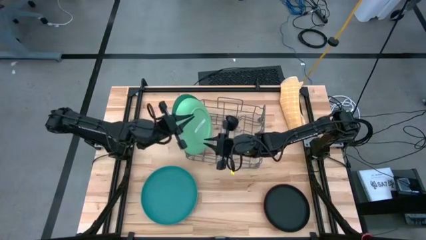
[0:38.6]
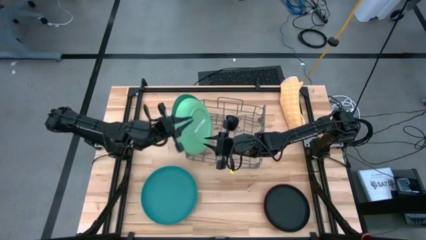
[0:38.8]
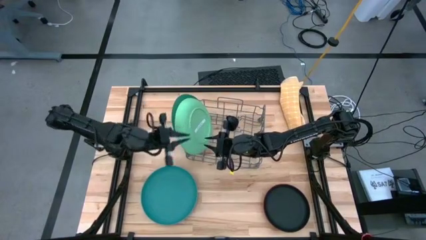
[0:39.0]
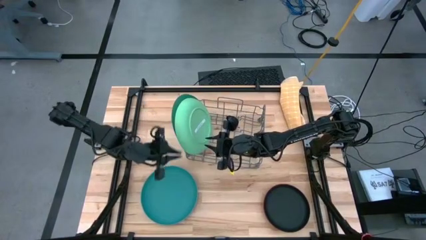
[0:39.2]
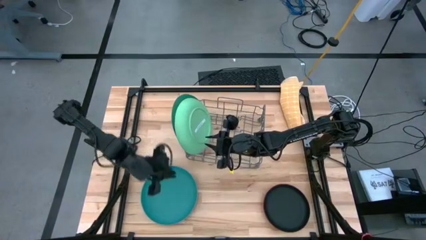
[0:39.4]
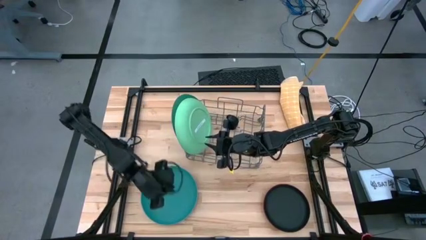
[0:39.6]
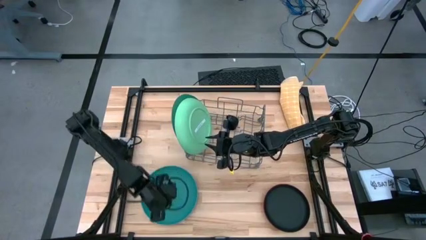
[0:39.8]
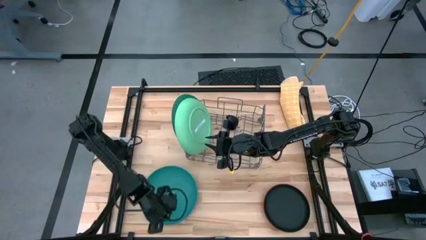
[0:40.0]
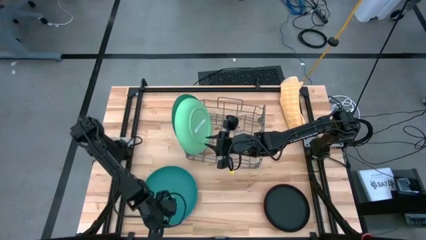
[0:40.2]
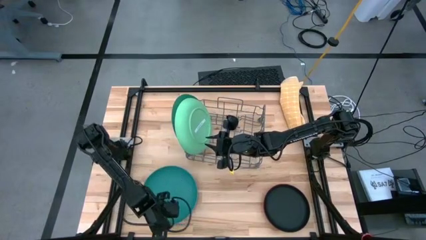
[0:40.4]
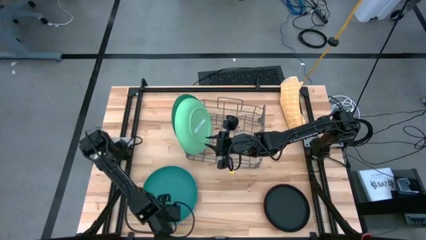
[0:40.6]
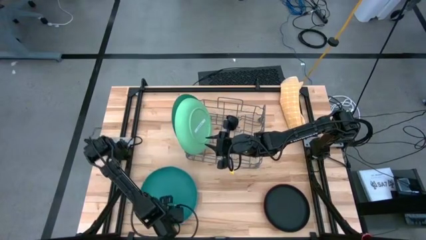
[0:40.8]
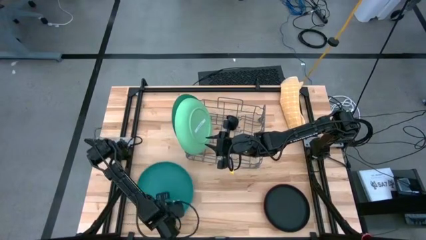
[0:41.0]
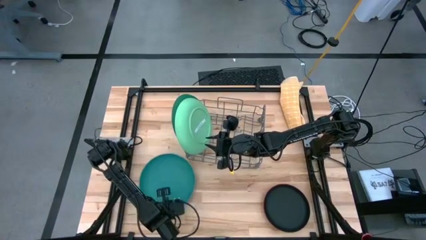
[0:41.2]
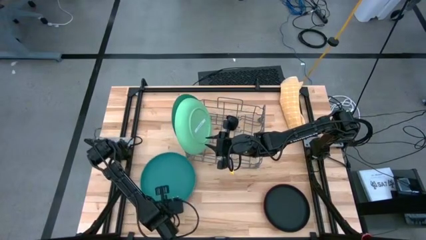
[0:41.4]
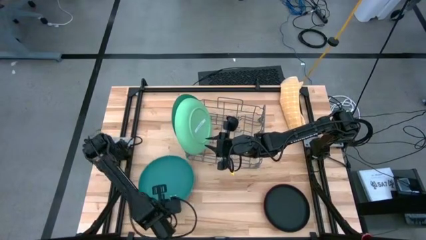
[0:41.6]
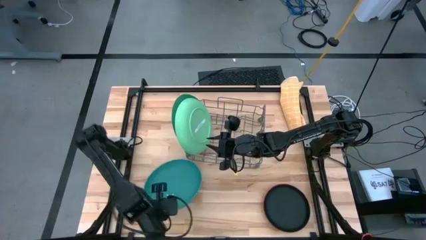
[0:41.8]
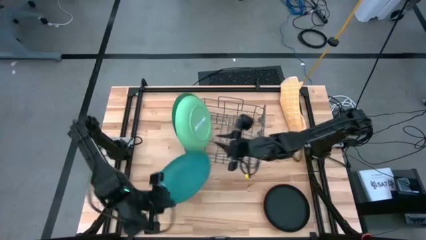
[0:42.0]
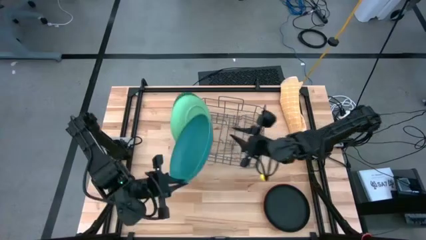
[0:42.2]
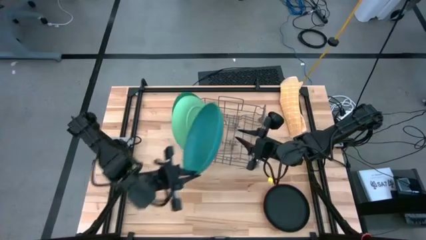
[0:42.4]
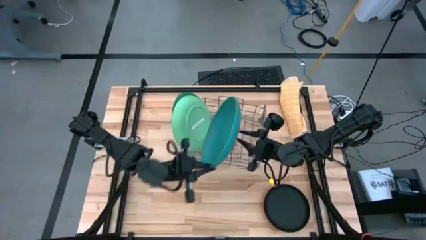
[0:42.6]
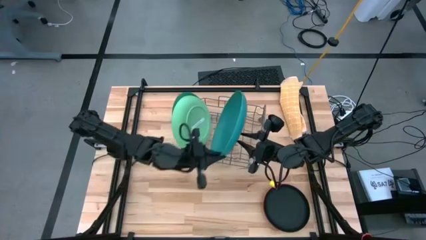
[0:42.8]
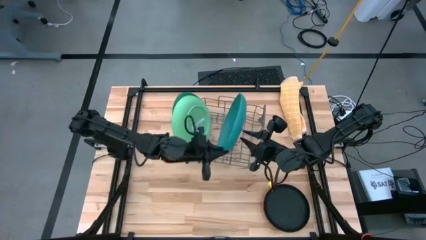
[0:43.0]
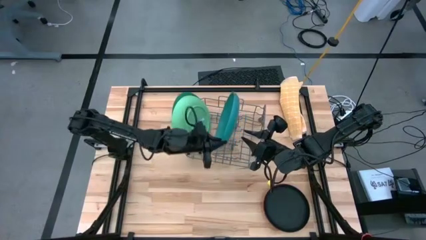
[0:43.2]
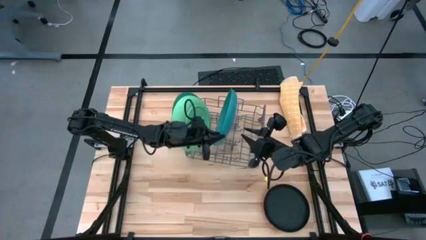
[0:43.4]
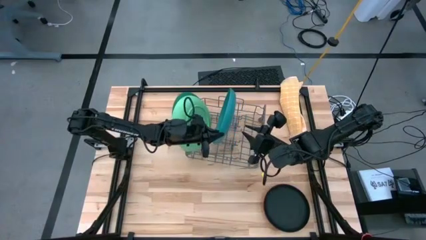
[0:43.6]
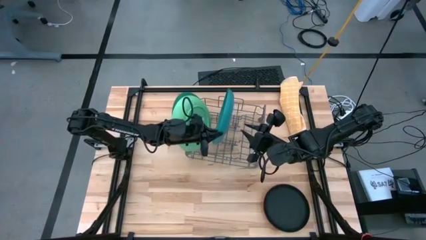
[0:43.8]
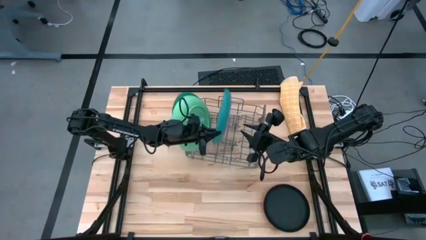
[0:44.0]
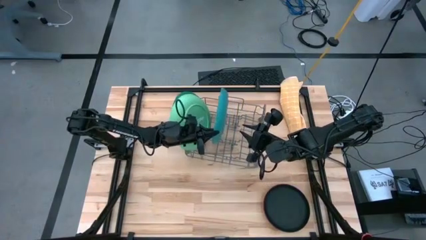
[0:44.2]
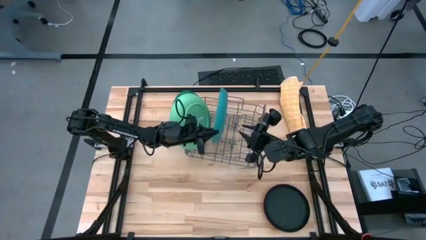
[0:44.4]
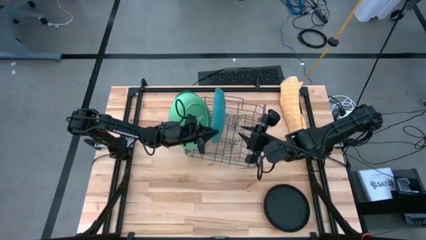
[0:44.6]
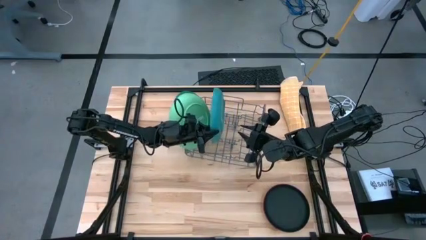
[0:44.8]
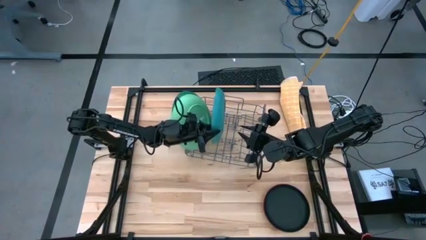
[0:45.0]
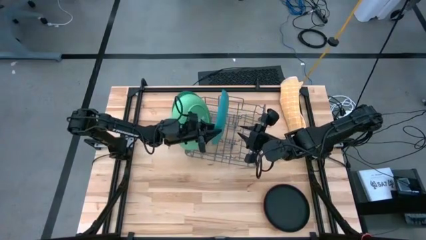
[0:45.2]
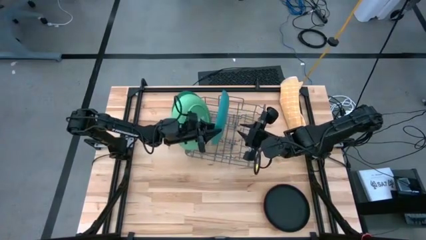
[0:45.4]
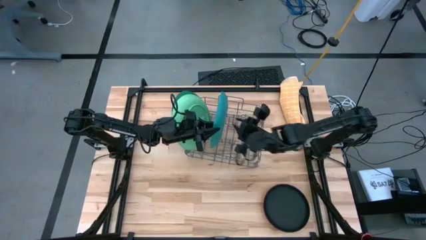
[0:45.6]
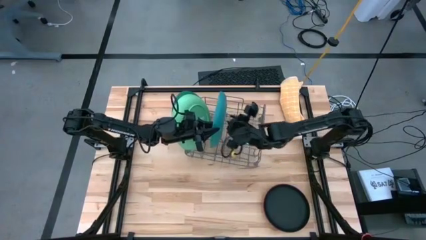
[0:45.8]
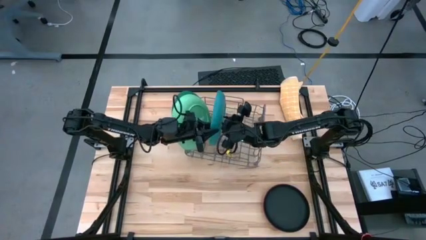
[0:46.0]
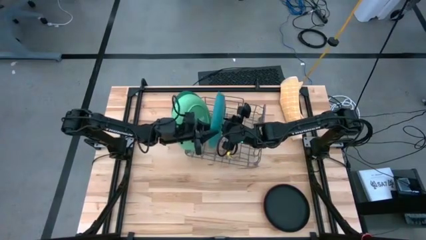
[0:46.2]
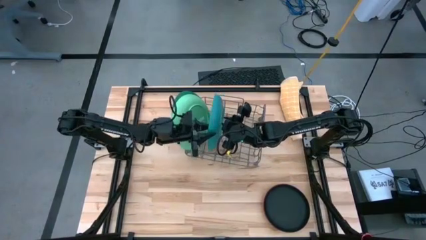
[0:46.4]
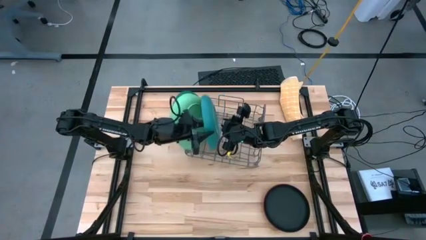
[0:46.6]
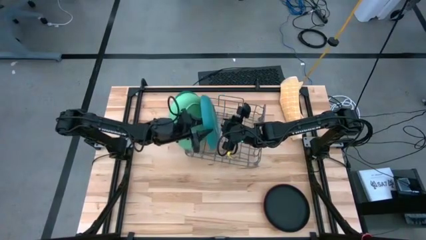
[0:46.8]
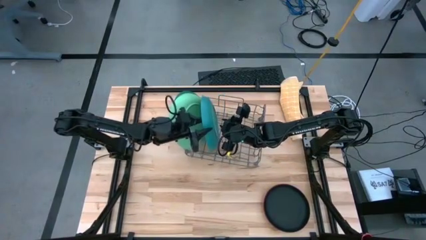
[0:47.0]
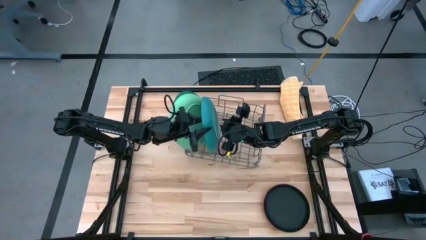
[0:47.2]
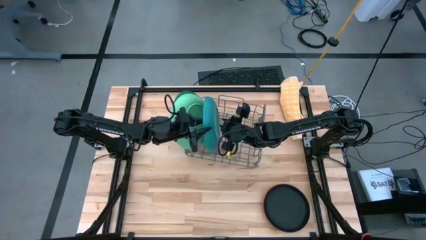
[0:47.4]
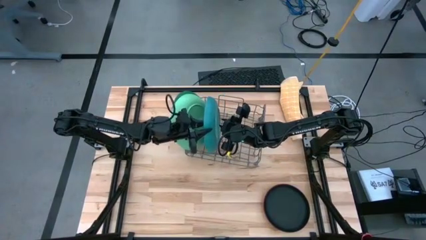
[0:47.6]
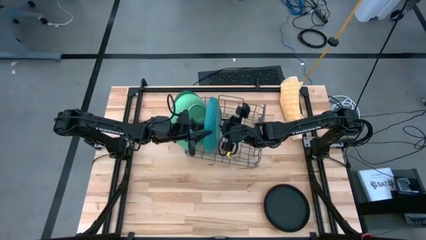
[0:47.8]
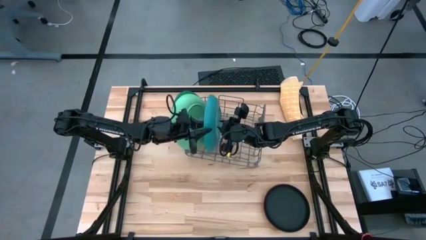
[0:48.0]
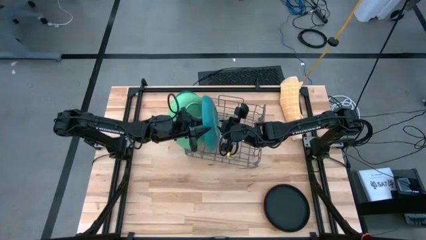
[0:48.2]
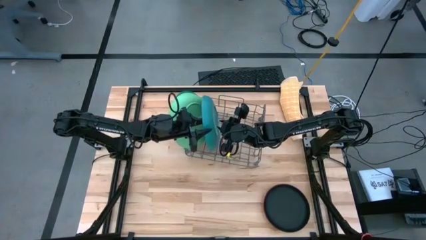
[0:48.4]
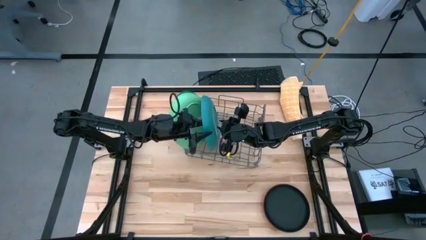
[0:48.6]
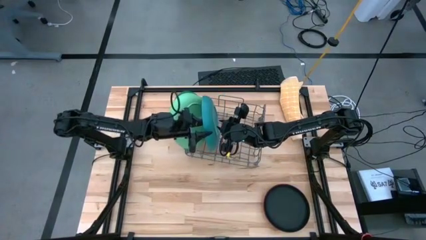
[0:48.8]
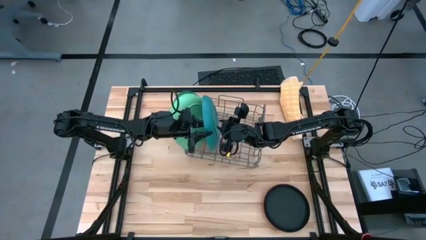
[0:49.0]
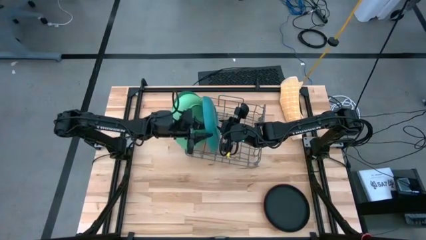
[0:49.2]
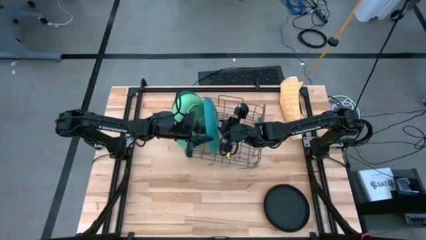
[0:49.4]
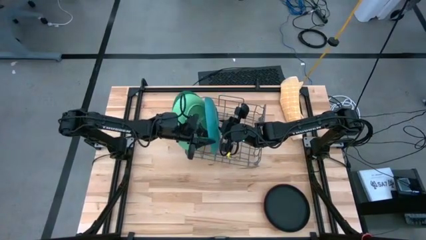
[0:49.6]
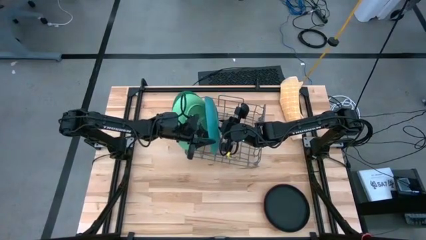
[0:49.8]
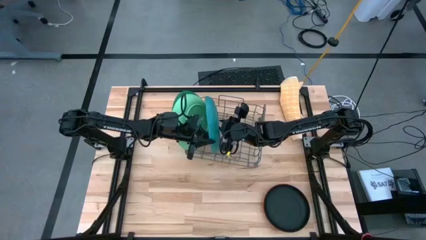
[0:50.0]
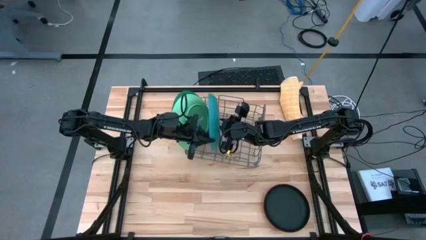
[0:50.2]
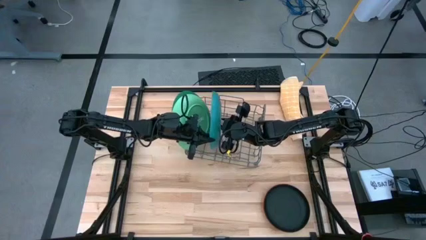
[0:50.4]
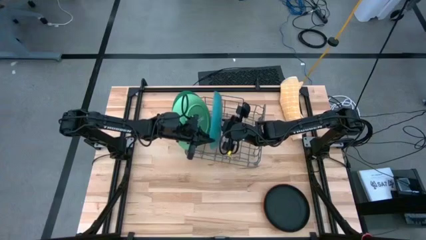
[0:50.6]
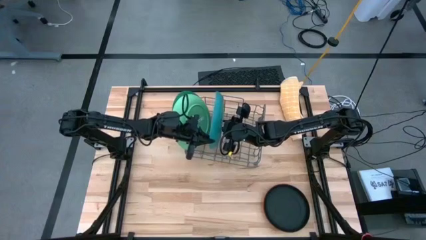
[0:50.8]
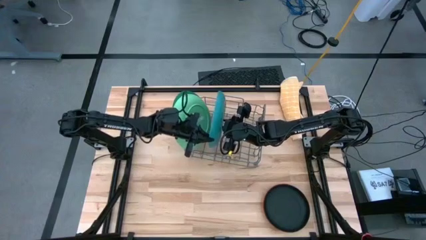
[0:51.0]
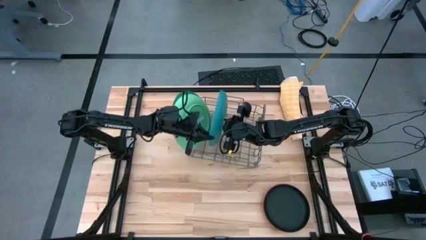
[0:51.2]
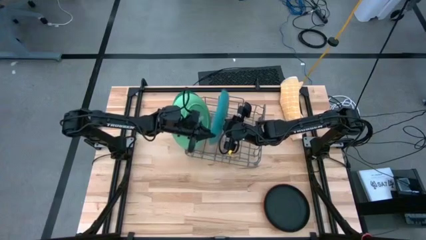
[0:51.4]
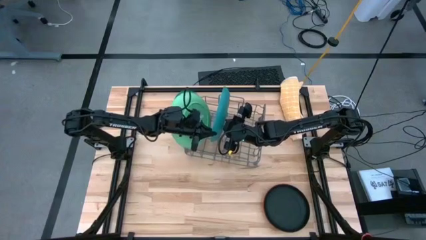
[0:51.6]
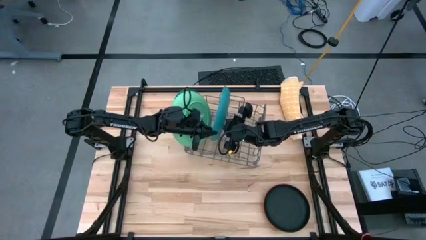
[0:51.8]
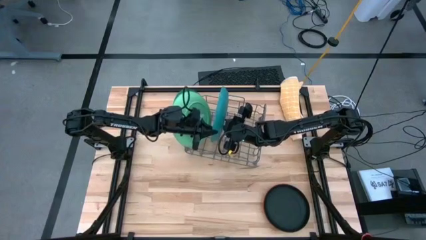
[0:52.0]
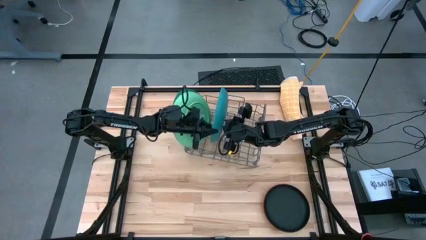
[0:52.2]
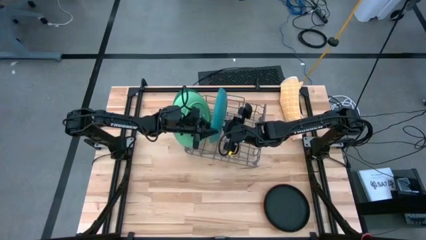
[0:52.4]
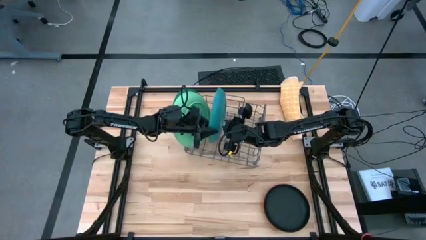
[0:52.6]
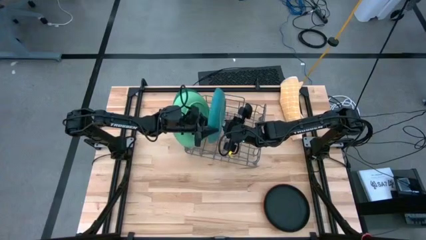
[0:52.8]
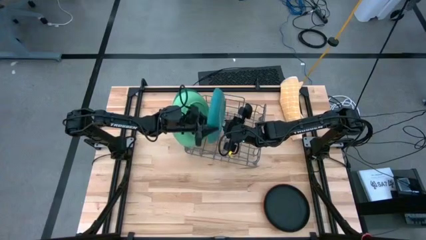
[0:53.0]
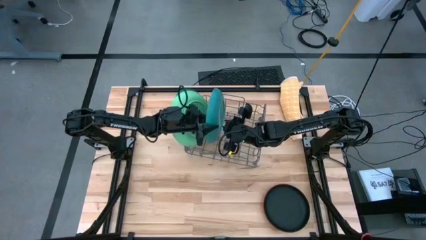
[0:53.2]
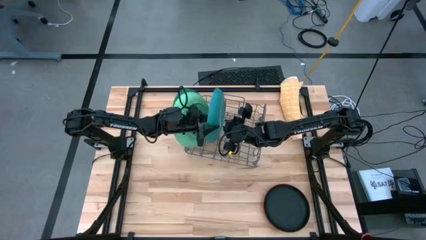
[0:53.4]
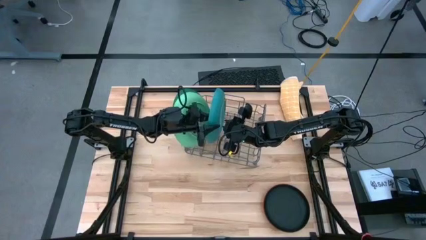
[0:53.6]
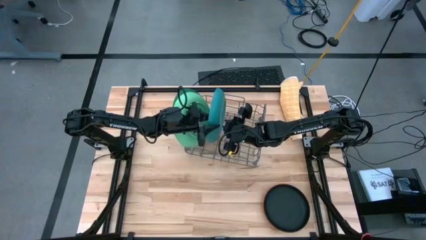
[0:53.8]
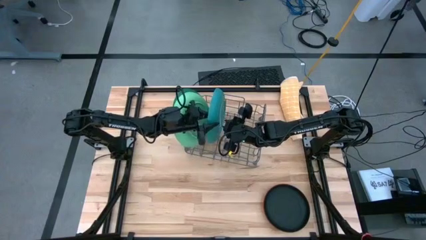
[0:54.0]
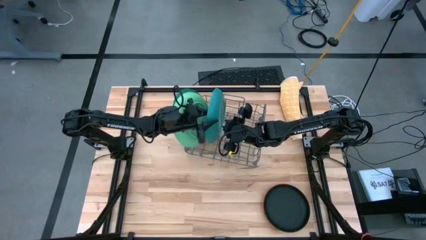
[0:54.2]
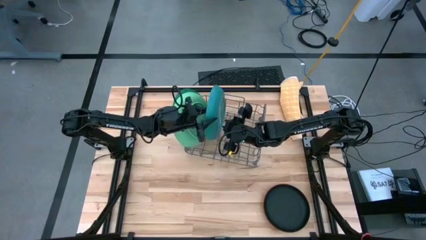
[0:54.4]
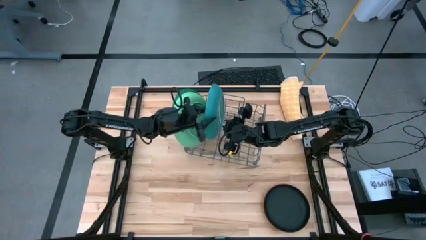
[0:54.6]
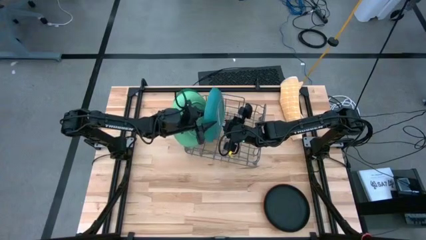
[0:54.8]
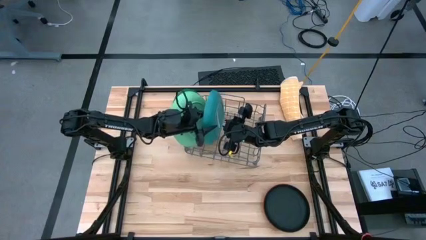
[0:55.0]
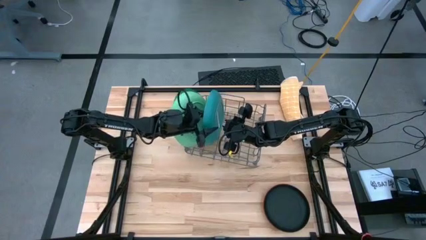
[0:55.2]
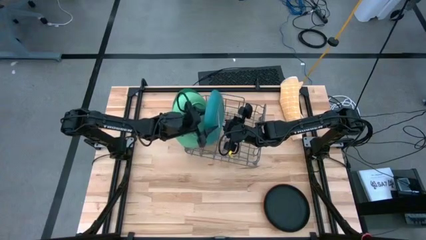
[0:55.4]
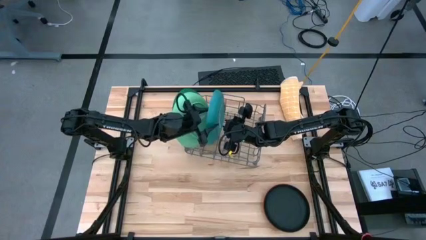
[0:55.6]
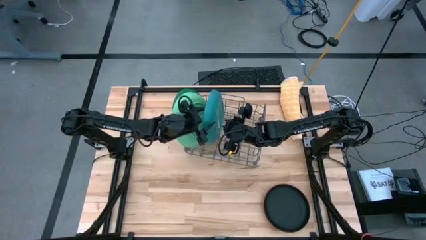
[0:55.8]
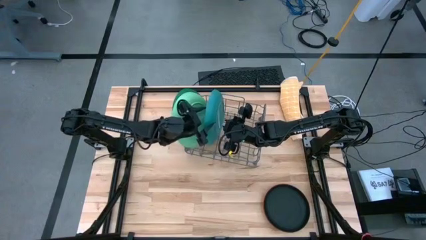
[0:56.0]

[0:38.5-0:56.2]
Task: Sort dishes
Put the blue plate into the dish rack
